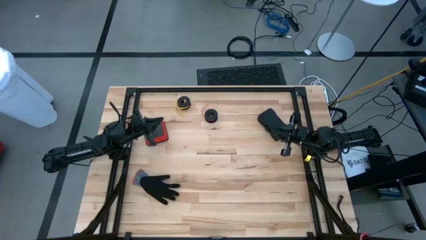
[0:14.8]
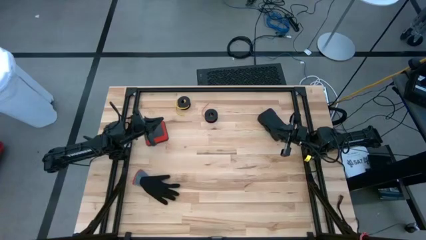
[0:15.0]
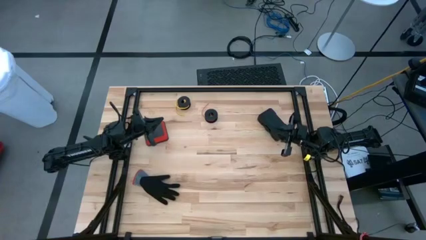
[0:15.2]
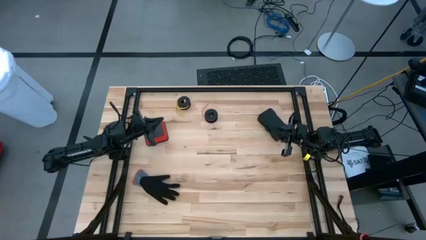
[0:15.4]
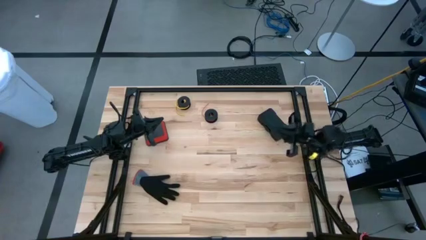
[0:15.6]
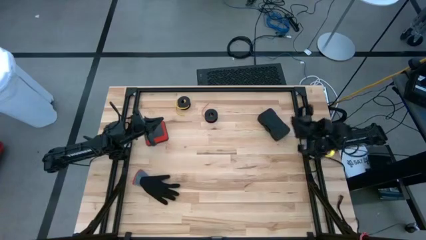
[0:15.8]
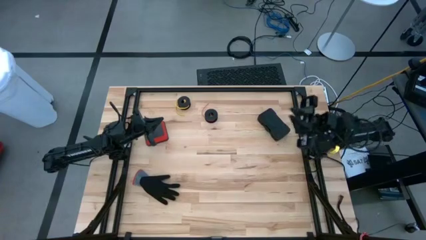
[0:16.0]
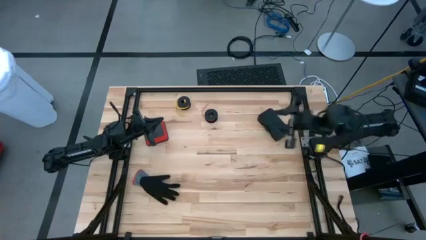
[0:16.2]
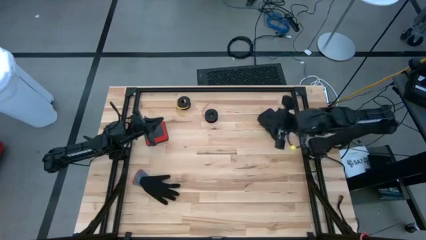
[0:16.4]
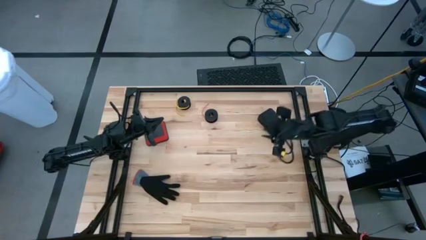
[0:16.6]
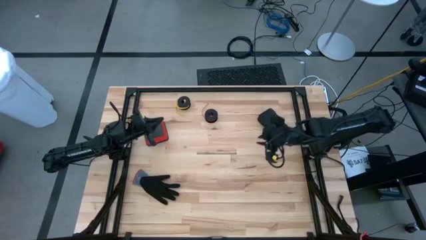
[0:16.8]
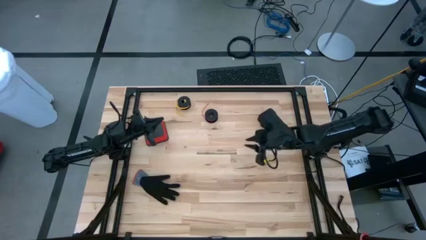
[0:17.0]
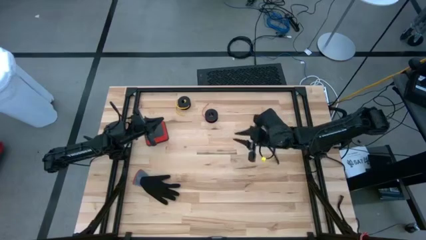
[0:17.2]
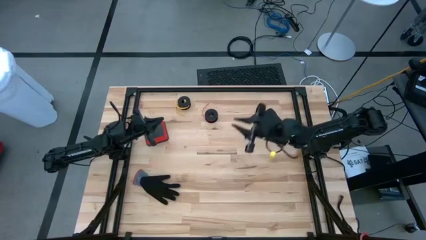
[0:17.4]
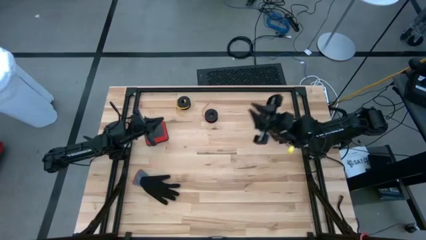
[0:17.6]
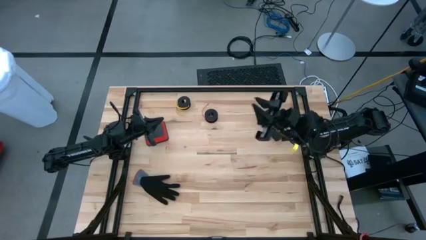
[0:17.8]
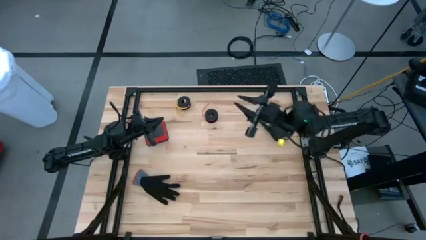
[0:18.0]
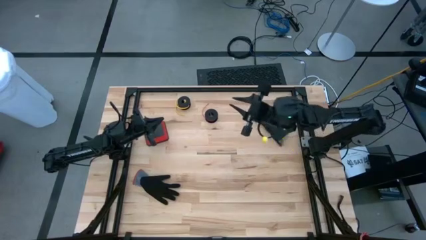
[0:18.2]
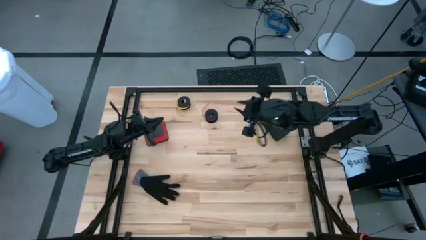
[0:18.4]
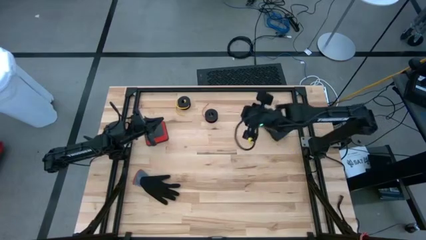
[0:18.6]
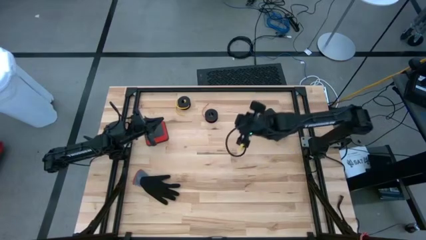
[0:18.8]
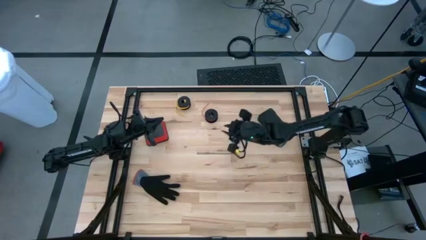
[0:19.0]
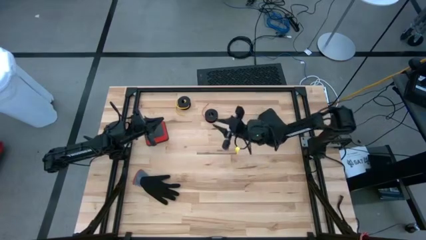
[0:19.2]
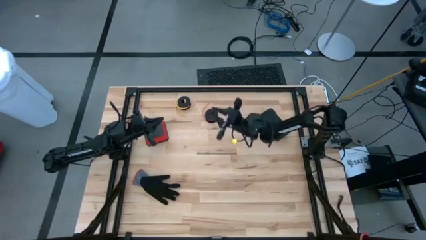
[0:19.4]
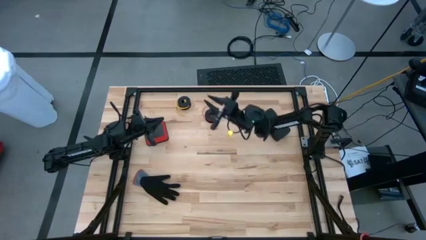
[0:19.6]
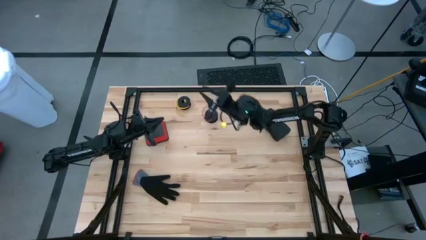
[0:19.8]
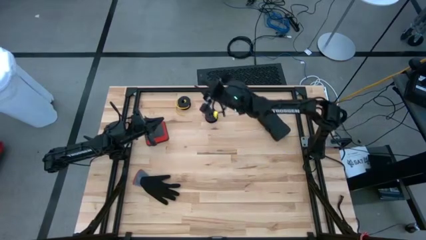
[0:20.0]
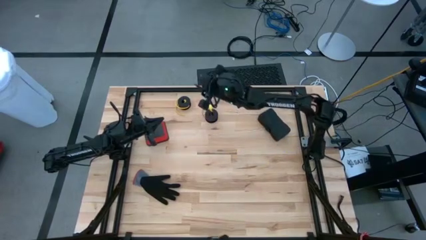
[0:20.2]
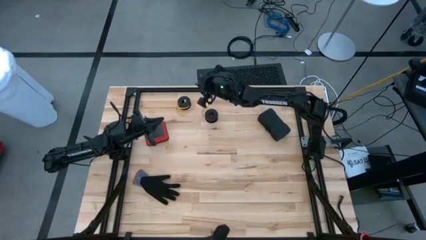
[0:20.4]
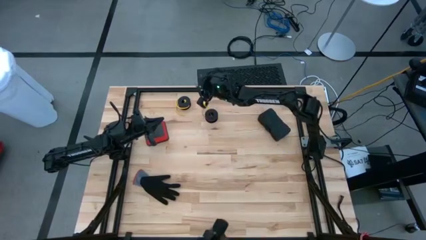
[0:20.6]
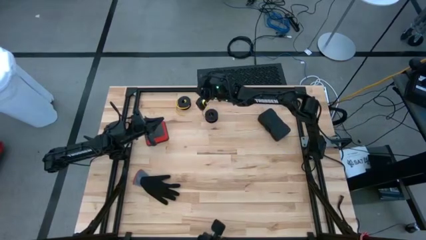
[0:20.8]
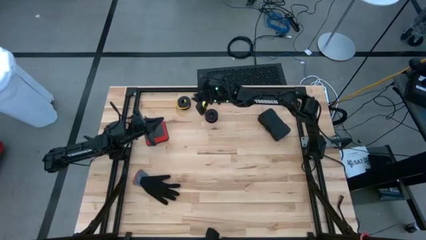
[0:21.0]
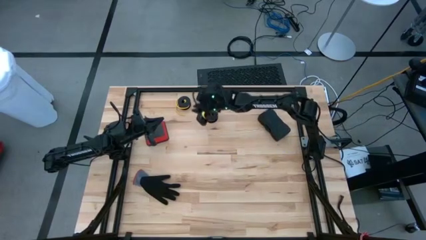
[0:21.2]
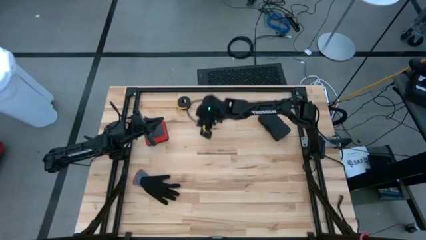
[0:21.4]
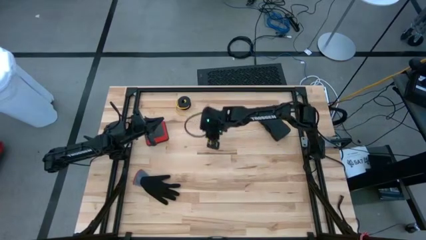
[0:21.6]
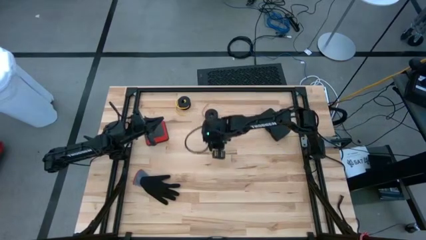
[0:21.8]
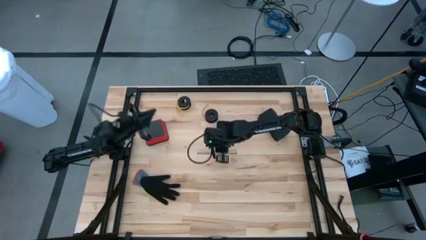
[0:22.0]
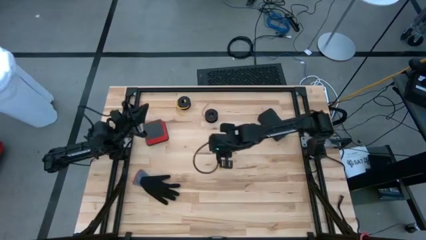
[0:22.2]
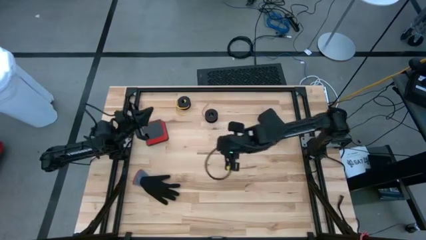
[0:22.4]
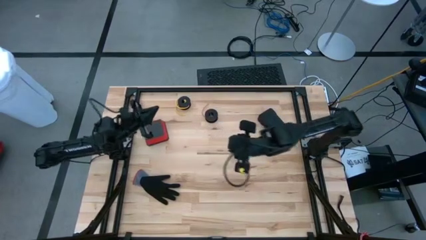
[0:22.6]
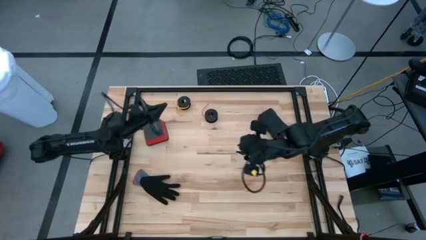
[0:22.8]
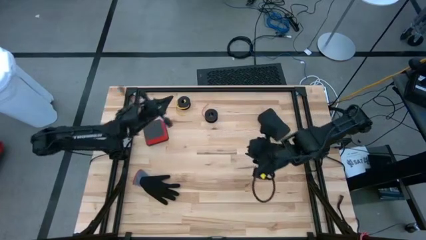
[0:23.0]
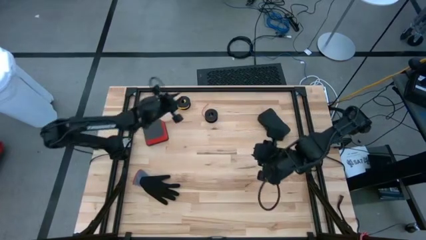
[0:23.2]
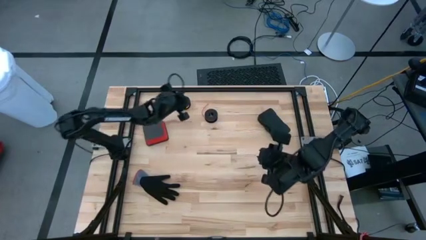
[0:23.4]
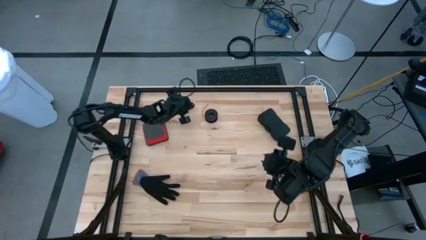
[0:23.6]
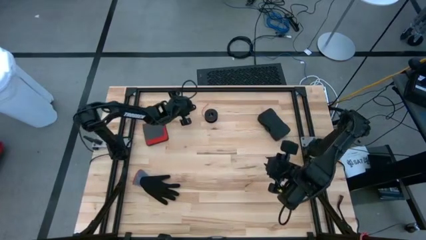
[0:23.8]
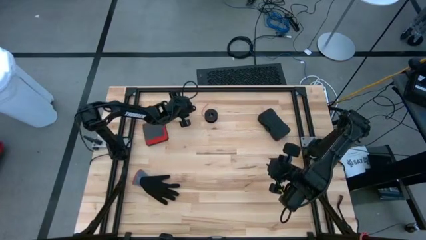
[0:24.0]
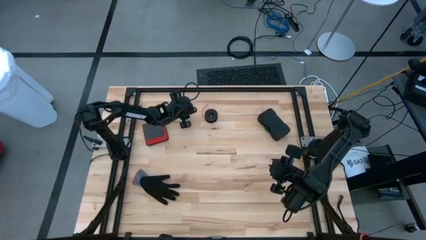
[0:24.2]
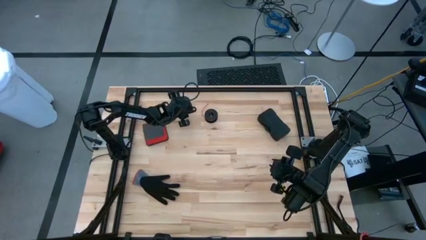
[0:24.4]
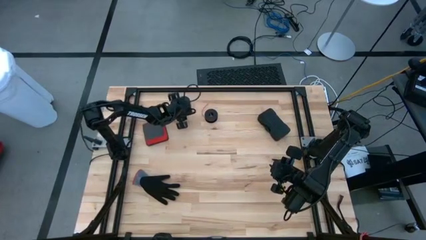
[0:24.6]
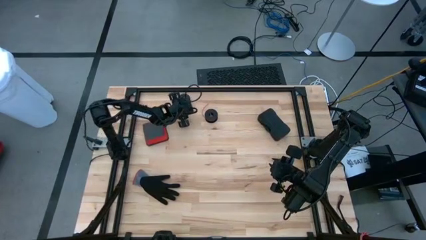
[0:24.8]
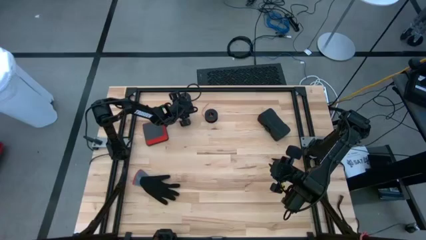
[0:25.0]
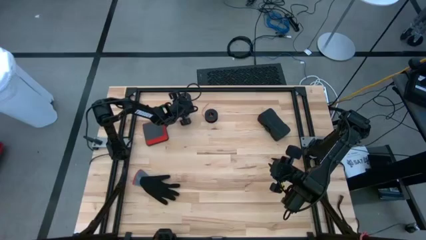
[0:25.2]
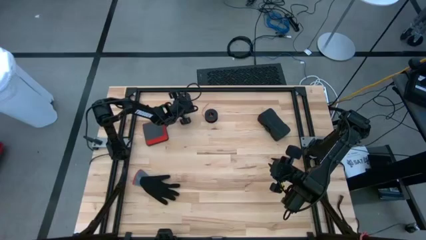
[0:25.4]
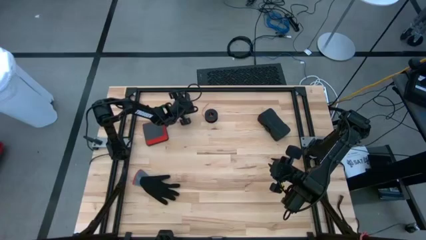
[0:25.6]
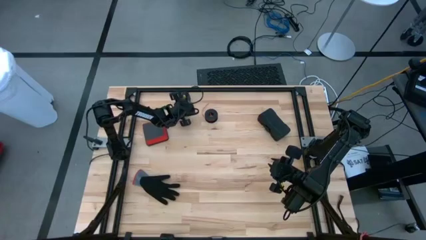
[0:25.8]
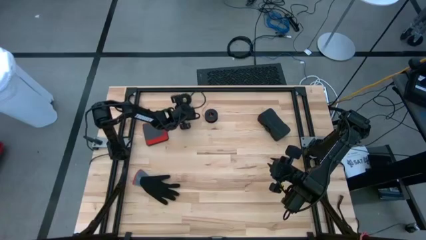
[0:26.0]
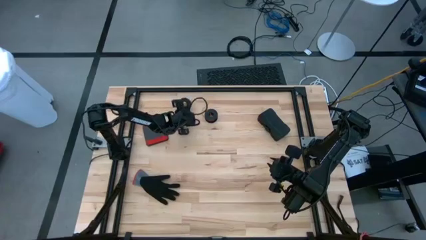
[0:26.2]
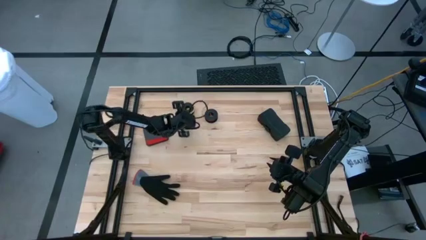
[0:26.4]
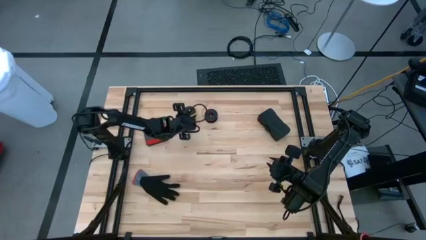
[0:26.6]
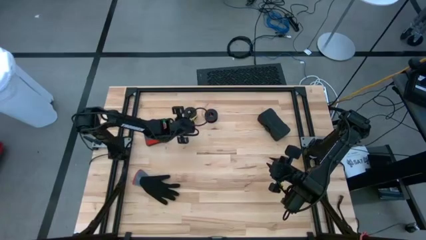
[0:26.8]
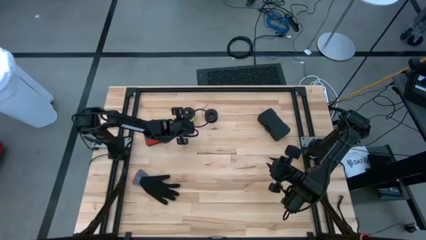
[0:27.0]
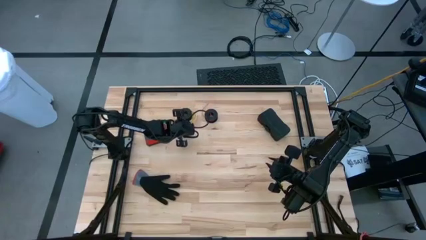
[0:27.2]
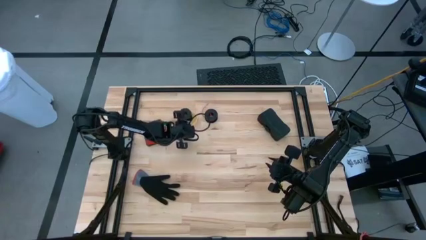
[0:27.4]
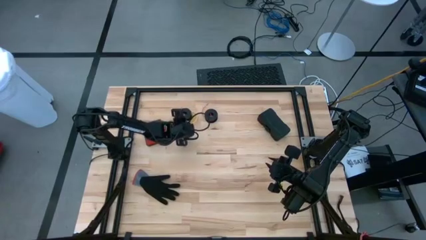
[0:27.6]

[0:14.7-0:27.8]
Task: Coil cords
Uncoil the yellow wire from the spool
